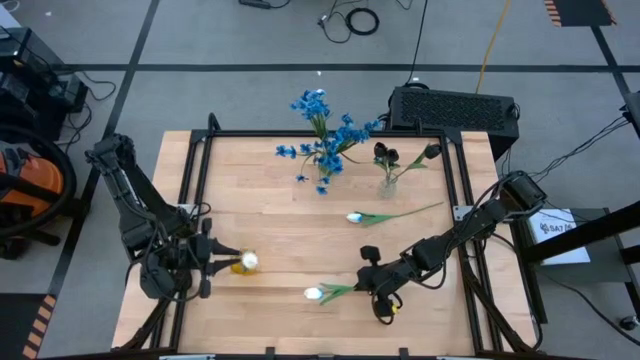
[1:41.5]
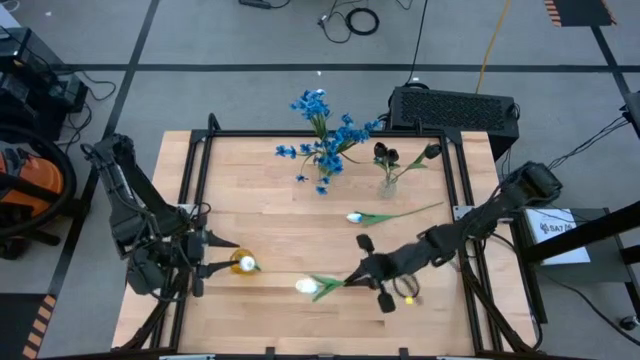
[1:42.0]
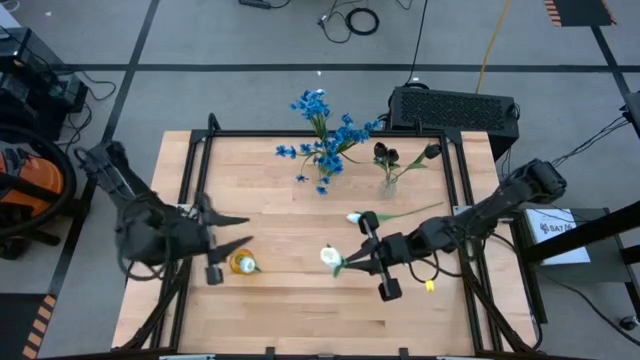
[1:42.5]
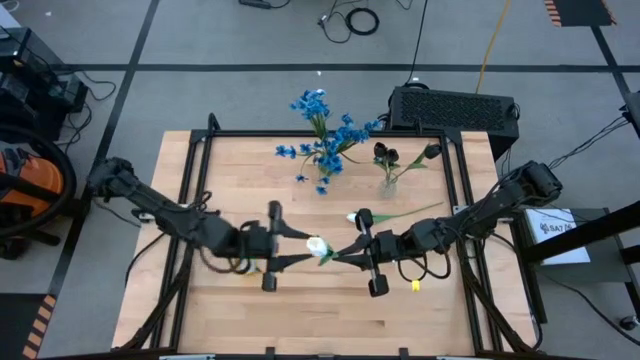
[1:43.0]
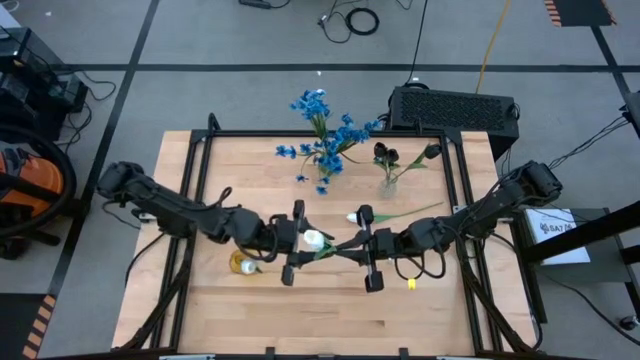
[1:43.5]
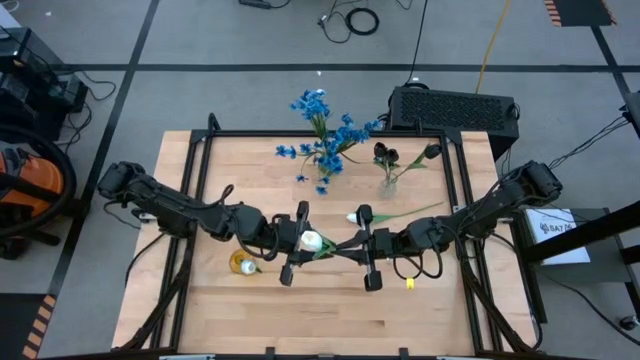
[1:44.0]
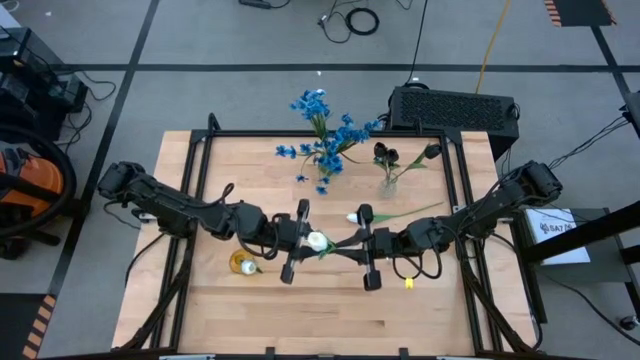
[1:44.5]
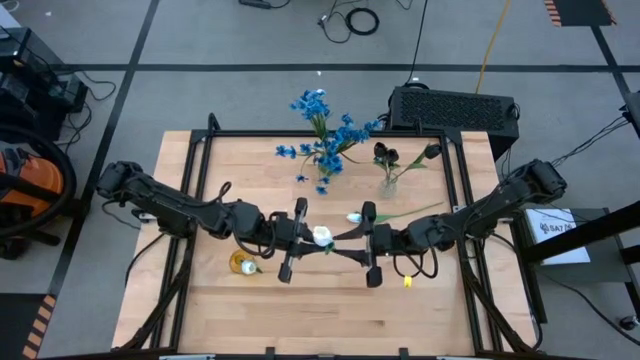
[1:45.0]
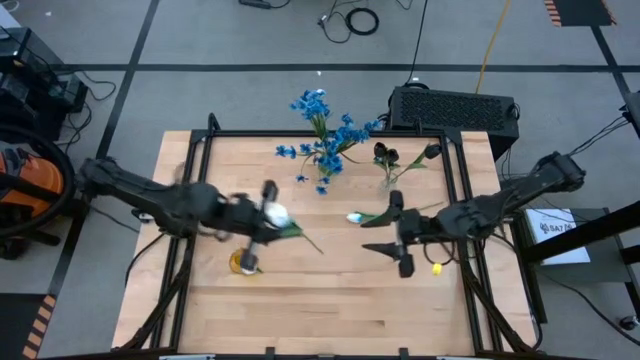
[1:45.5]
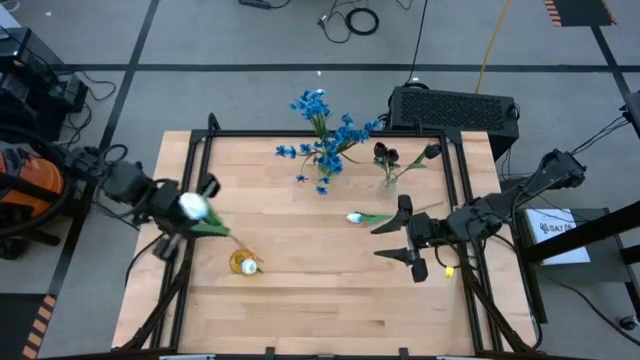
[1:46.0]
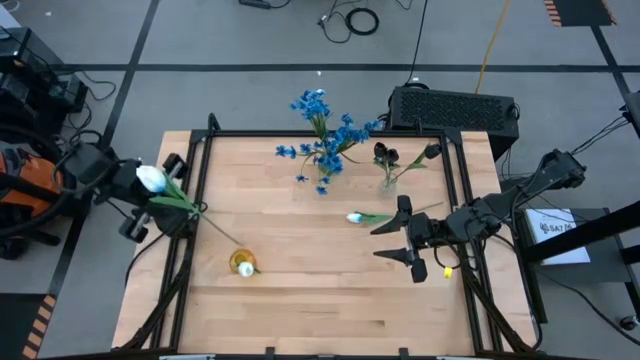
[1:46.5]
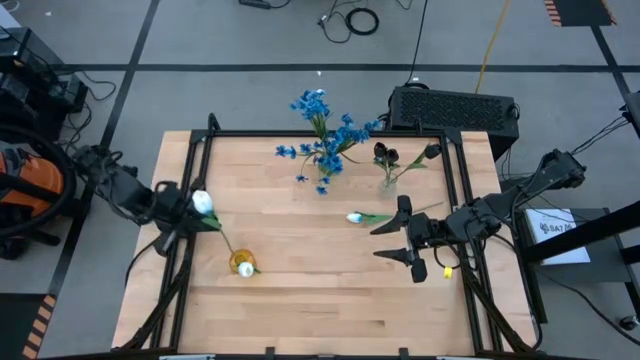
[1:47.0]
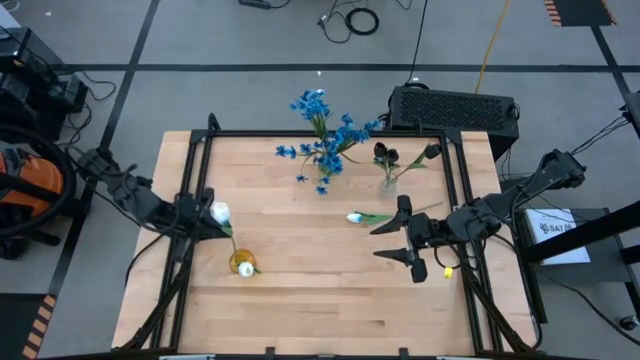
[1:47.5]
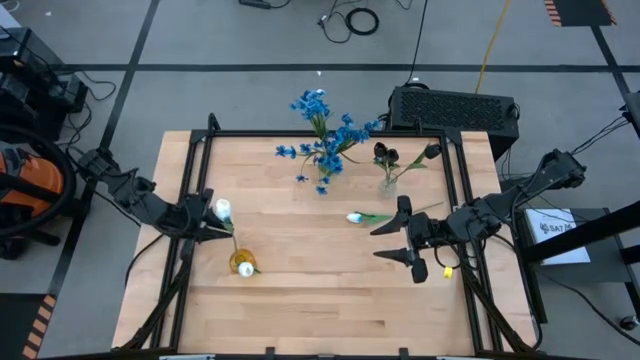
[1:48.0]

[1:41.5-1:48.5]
Task: Sort flowers into vase by color
Put the bottom white tulip into the yellow vase

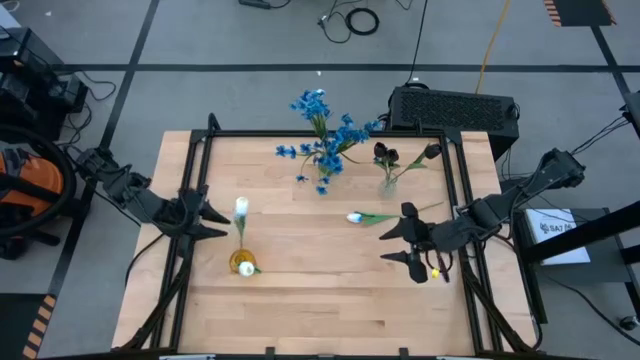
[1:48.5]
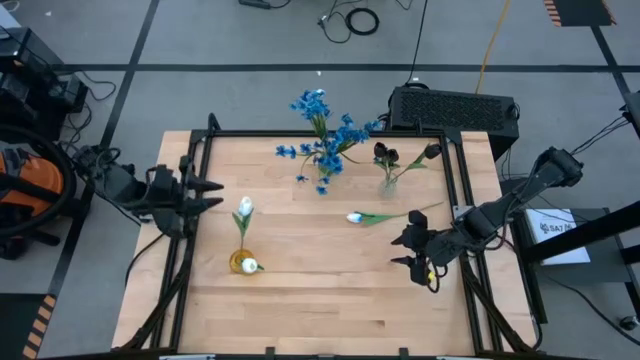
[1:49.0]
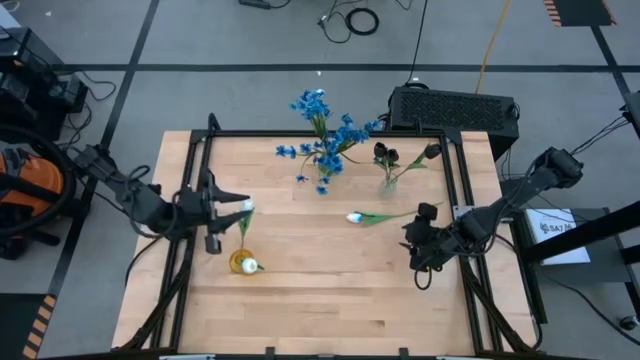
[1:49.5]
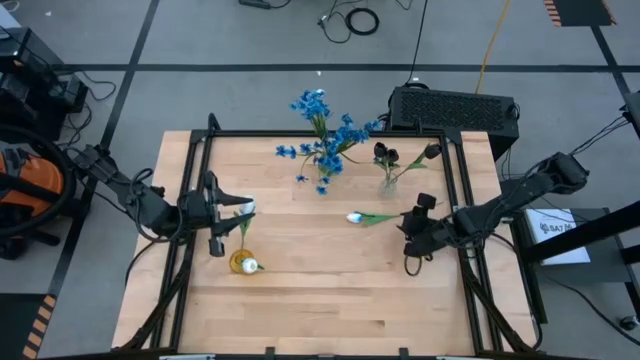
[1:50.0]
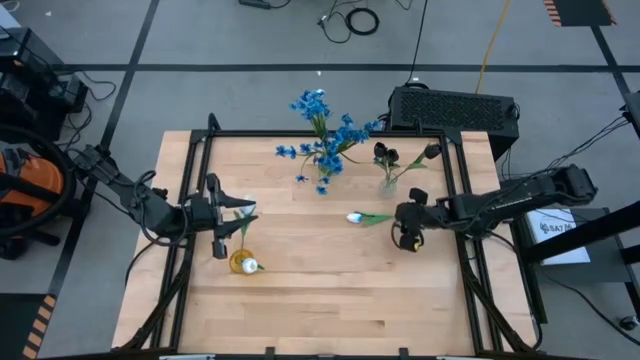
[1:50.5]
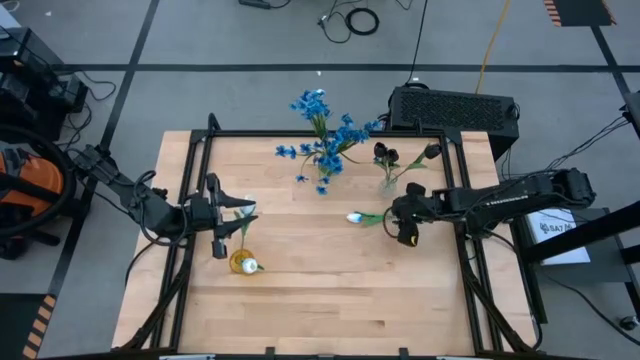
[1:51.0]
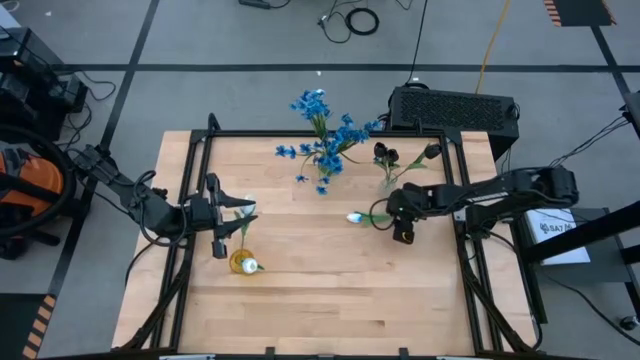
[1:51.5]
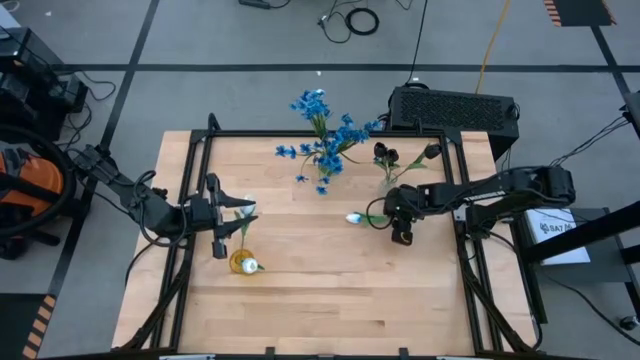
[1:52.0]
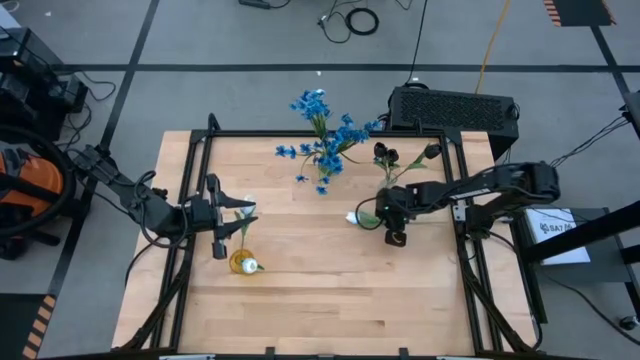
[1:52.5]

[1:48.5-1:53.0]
Put the white tulip into the yellow vase

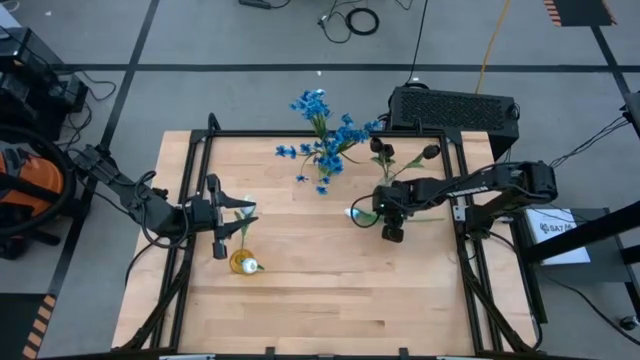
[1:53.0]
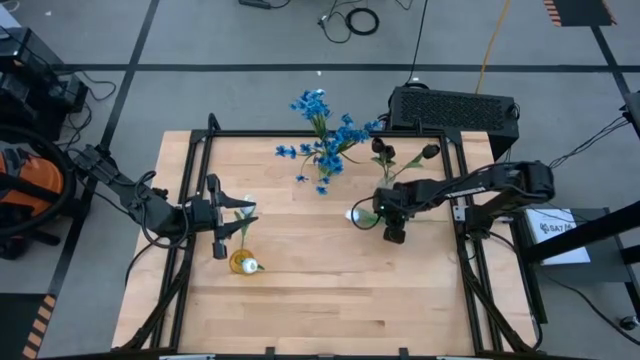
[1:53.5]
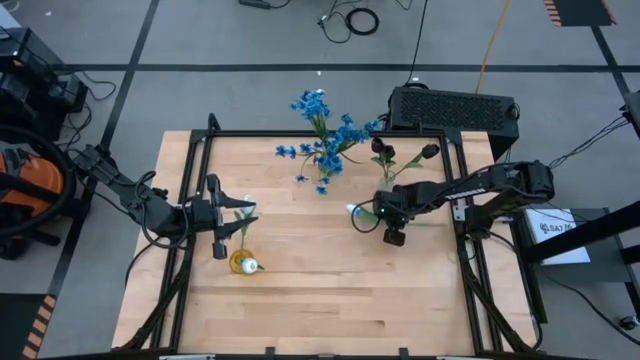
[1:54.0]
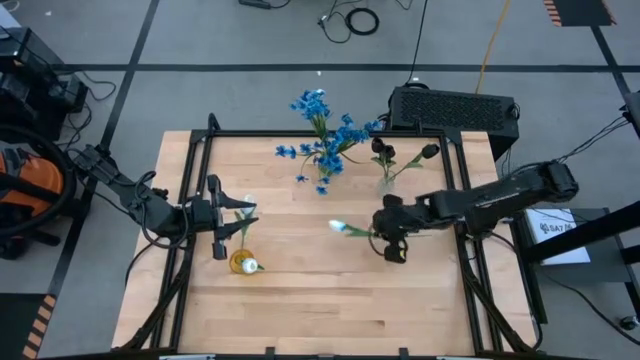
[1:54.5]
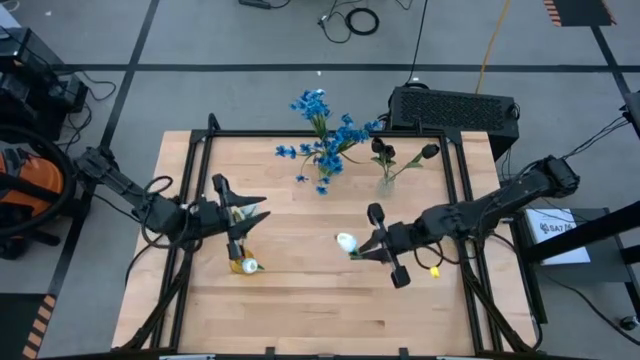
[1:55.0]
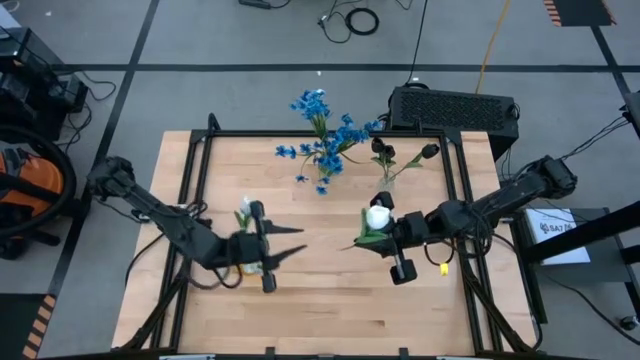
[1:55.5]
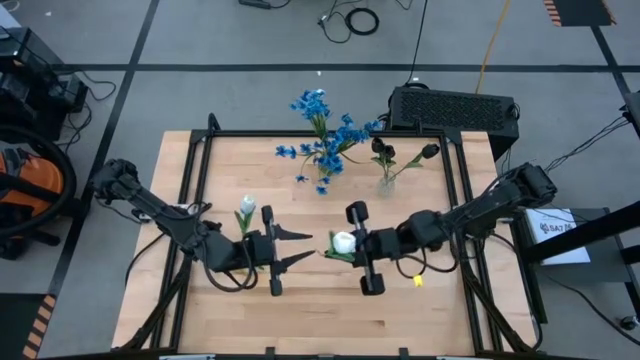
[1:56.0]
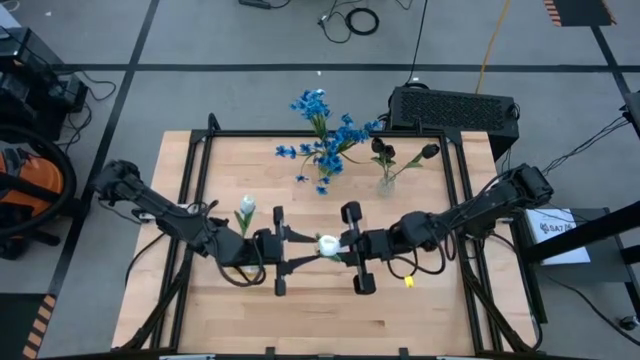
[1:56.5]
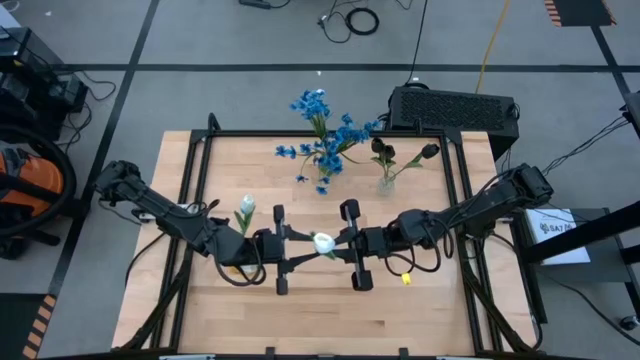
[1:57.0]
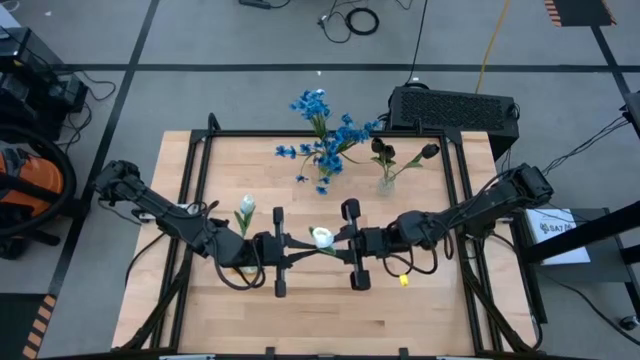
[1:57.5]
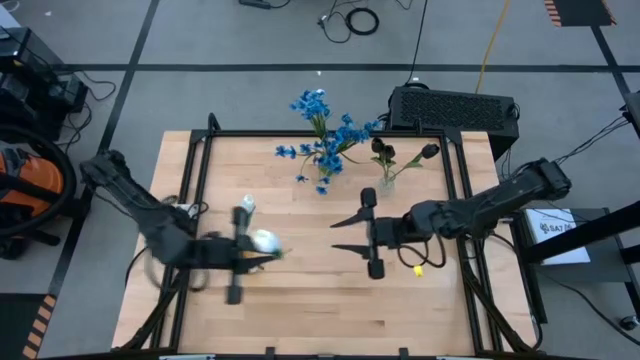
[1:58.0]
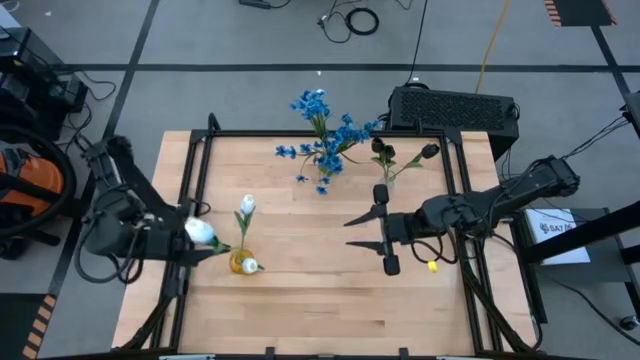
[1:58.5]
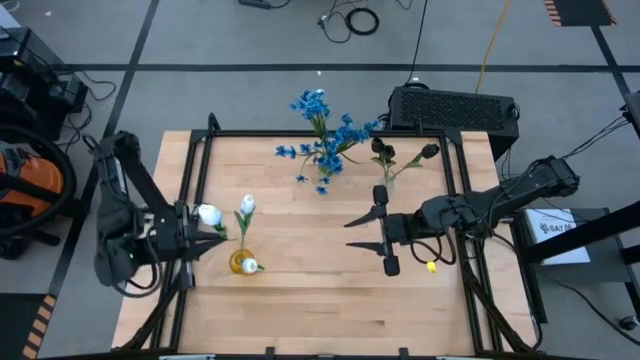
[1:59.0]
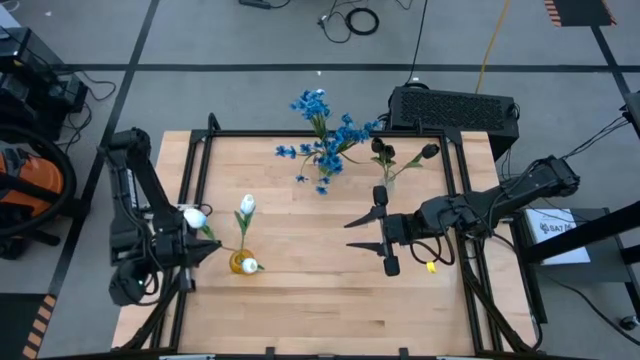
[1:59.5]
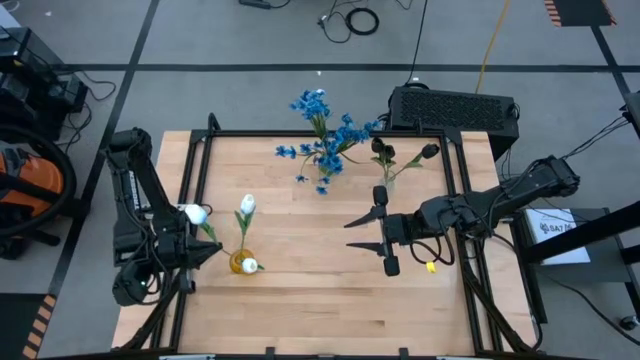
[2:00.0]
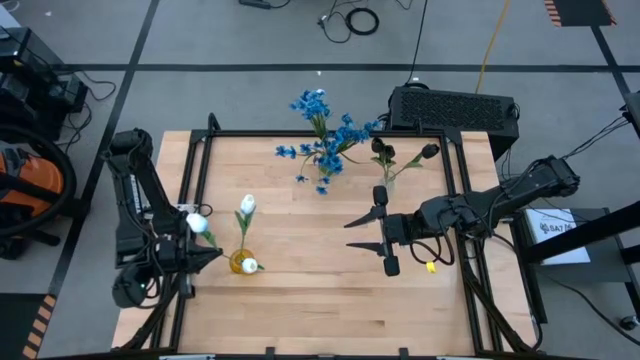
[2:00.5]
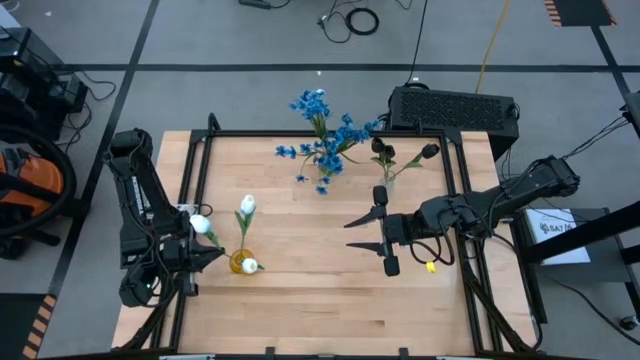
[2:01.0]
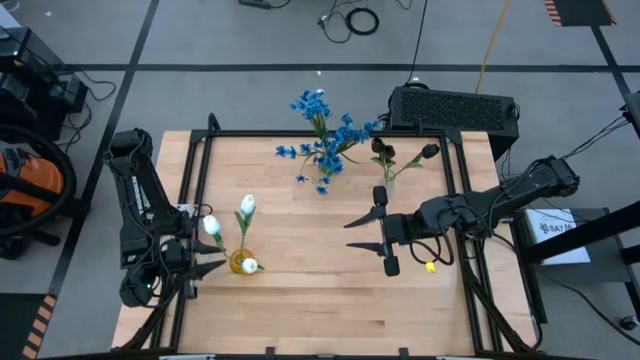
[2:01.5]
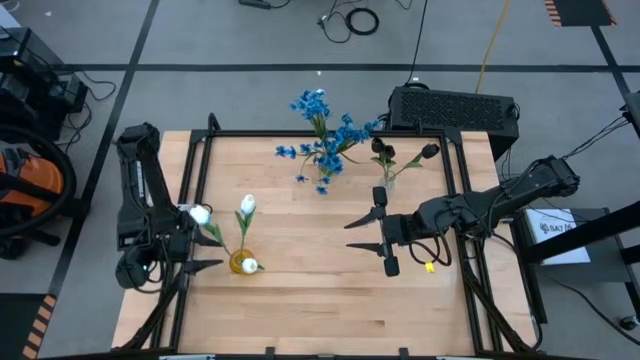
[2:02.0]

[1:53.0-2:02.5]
Put the white tulip into the yellow vase

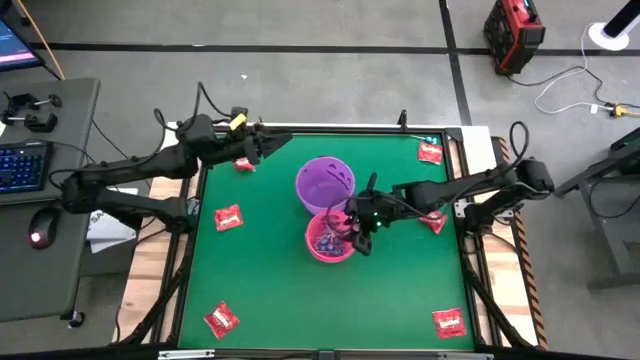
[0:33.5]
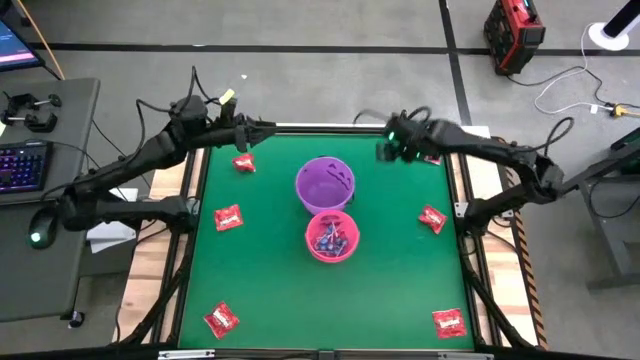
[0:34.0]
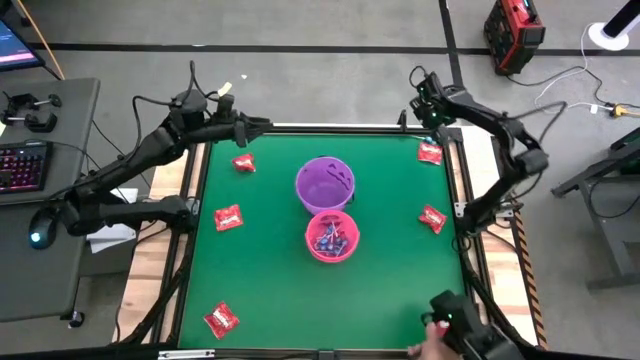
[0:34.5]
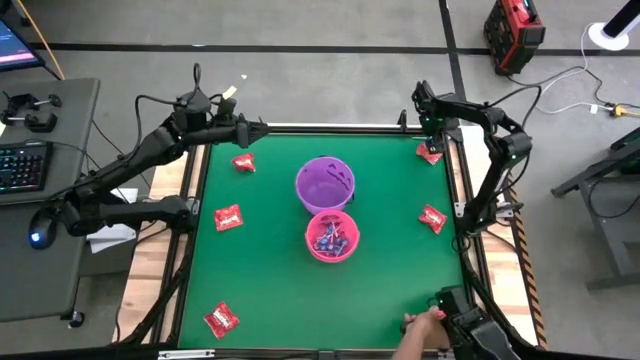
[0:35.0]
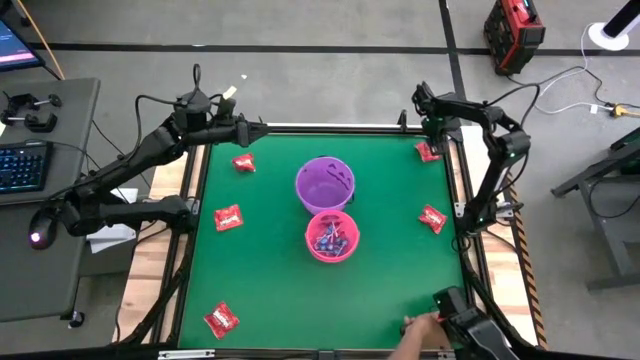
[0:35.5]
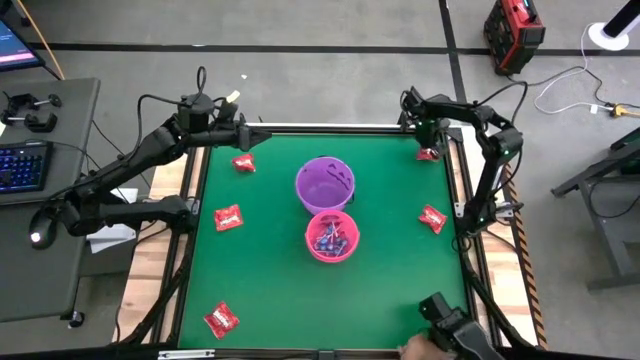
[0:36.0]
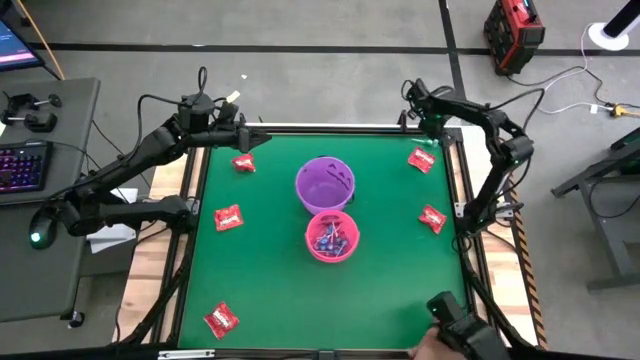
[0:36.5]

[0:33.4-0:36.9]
Task: Sort candy by brand, put in halloween buckets
Put the blue candy into the pink bucket
